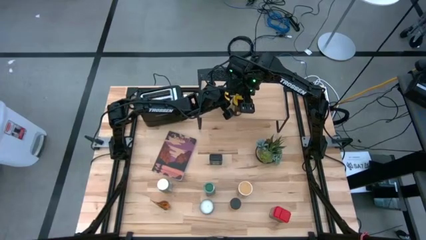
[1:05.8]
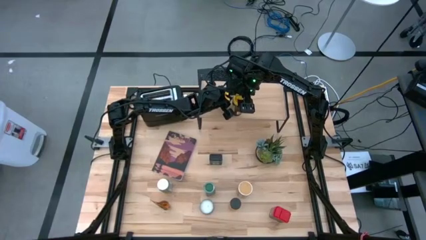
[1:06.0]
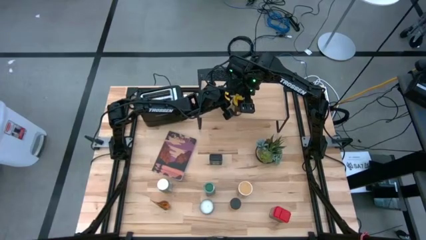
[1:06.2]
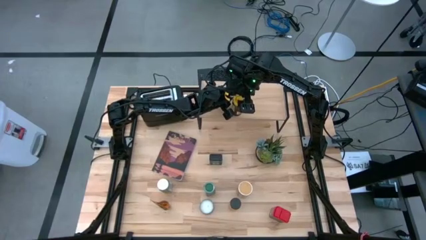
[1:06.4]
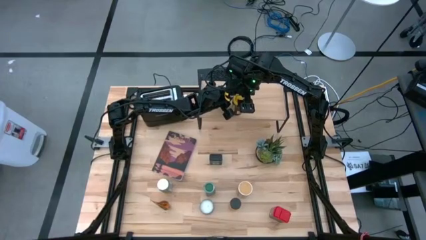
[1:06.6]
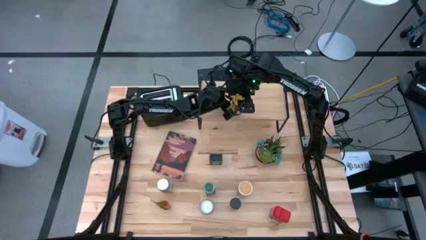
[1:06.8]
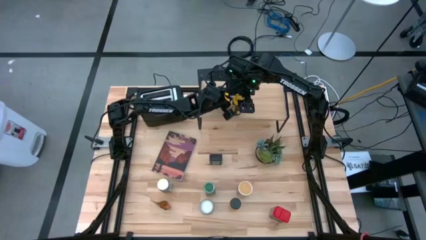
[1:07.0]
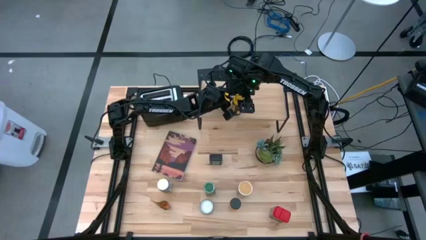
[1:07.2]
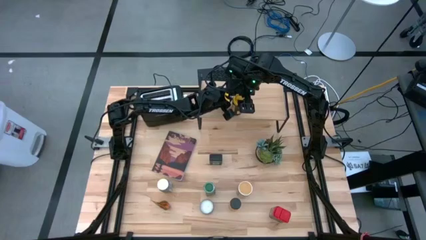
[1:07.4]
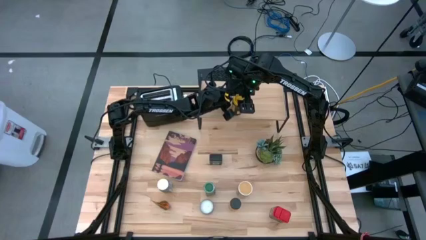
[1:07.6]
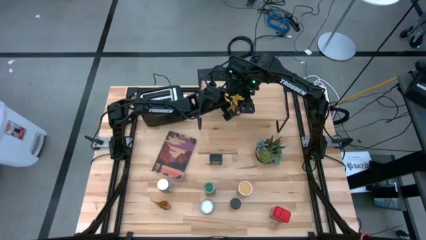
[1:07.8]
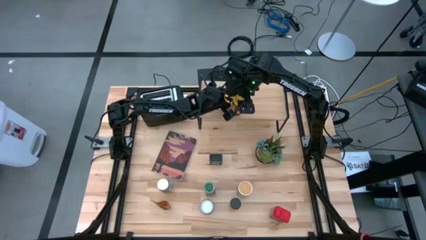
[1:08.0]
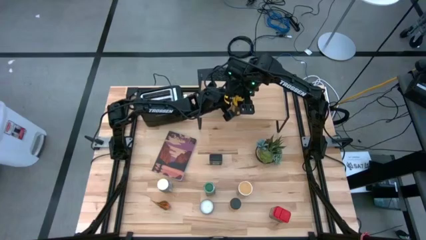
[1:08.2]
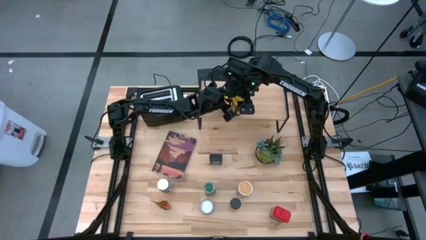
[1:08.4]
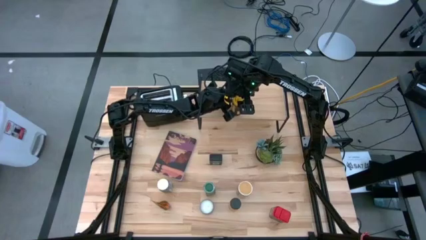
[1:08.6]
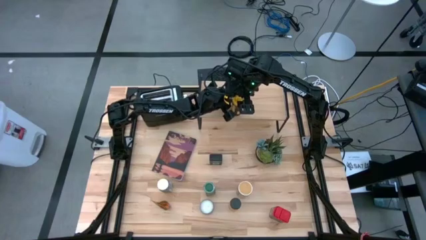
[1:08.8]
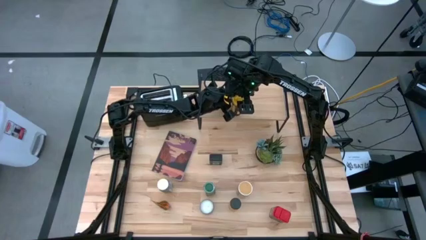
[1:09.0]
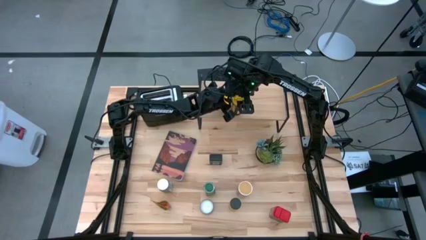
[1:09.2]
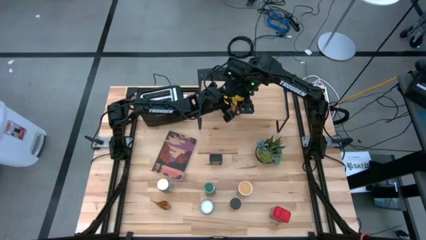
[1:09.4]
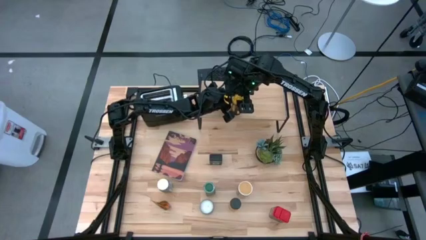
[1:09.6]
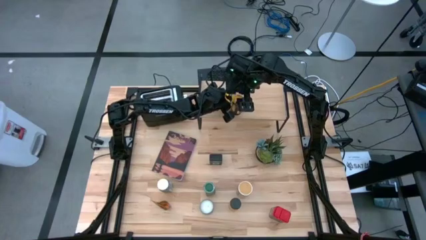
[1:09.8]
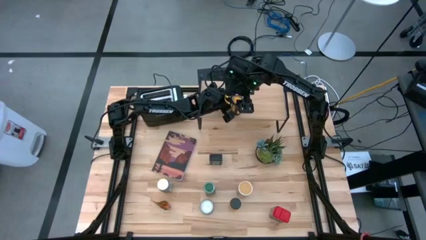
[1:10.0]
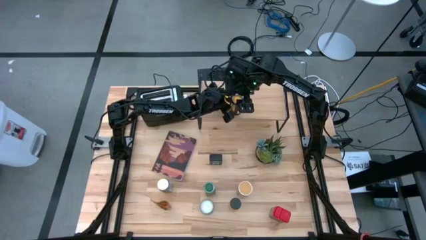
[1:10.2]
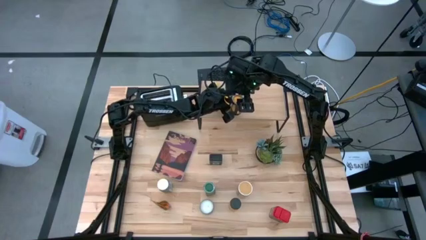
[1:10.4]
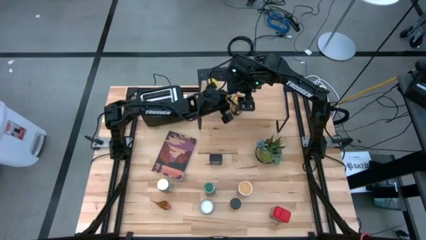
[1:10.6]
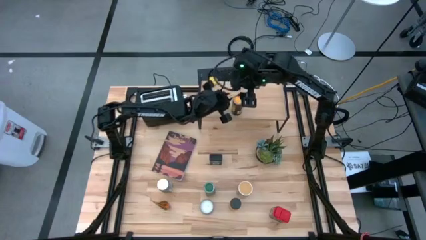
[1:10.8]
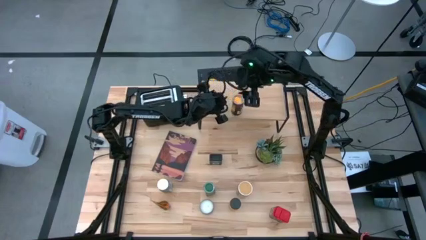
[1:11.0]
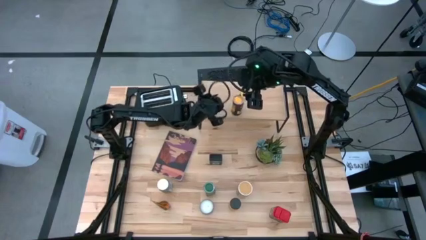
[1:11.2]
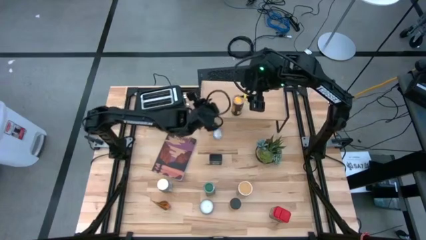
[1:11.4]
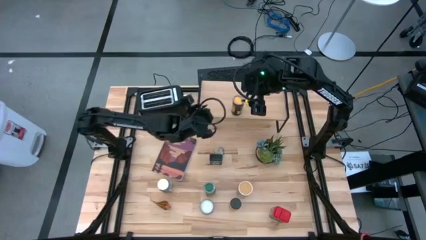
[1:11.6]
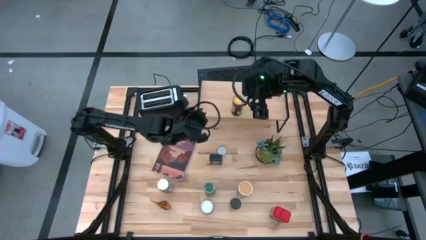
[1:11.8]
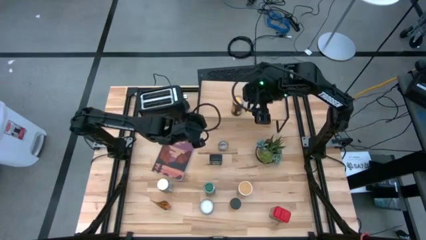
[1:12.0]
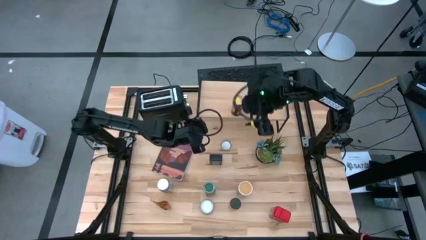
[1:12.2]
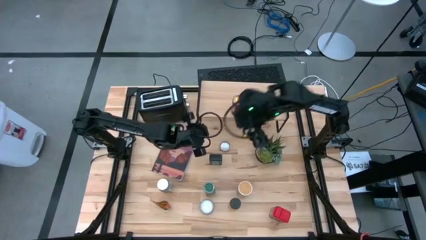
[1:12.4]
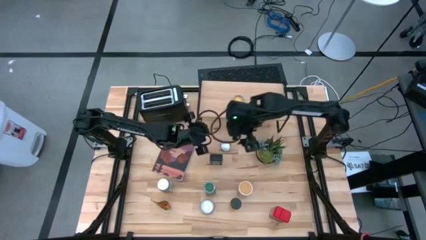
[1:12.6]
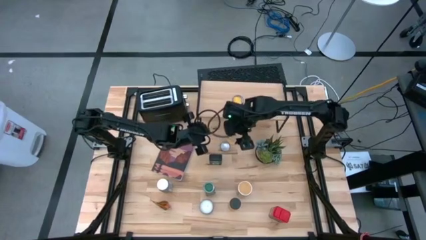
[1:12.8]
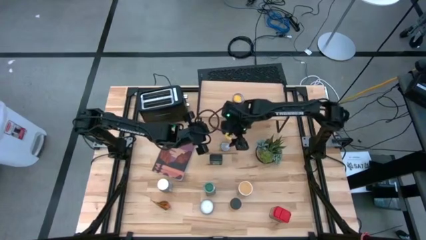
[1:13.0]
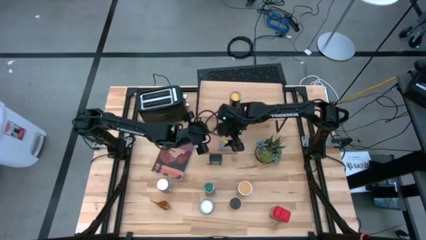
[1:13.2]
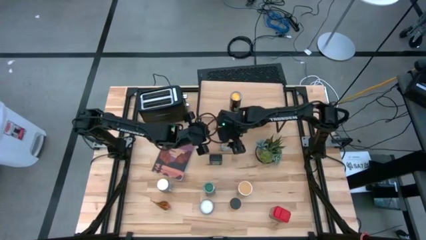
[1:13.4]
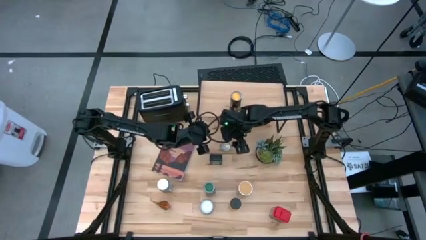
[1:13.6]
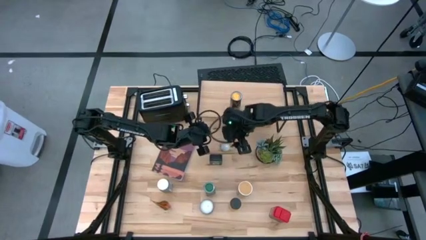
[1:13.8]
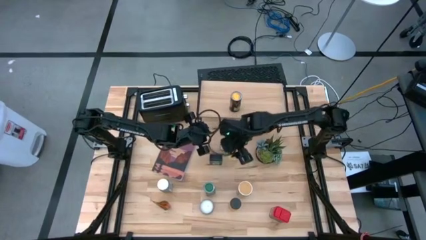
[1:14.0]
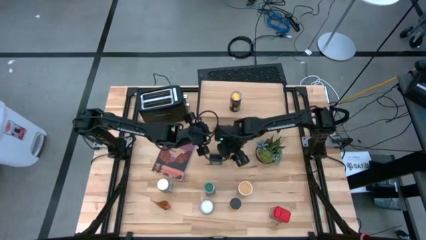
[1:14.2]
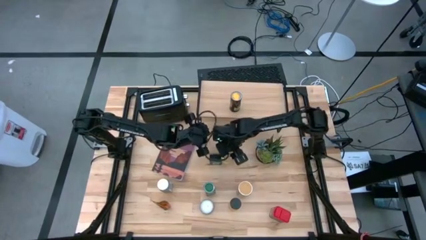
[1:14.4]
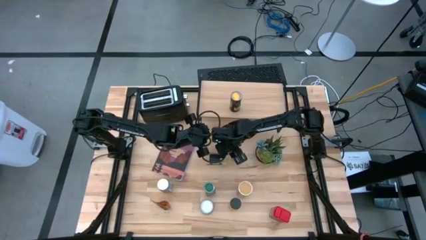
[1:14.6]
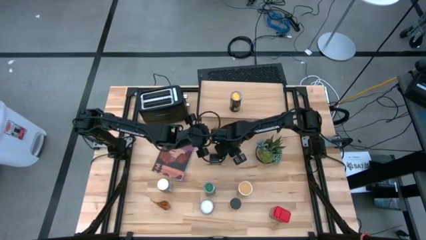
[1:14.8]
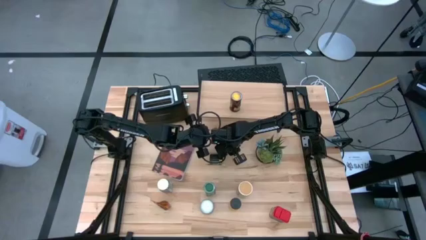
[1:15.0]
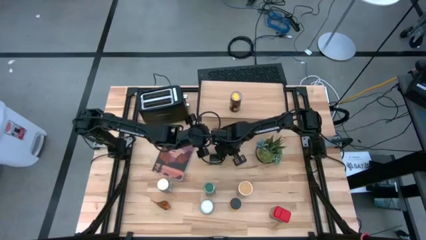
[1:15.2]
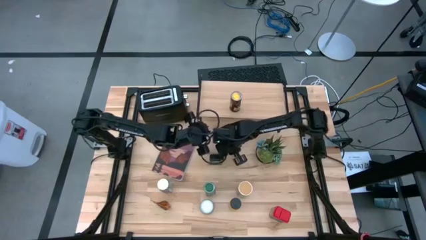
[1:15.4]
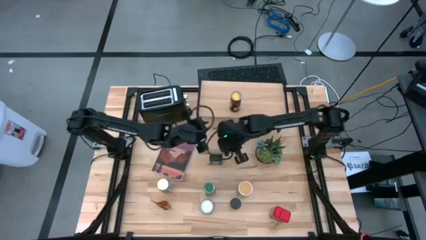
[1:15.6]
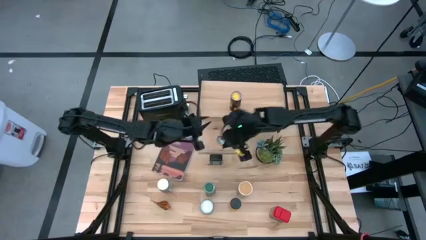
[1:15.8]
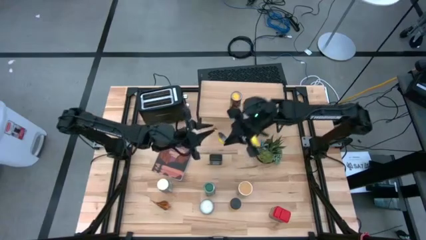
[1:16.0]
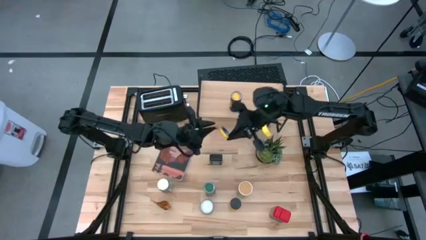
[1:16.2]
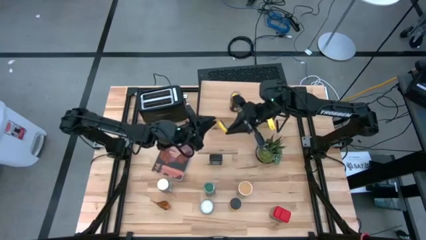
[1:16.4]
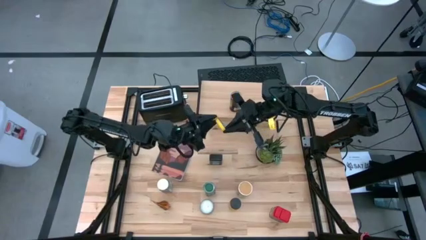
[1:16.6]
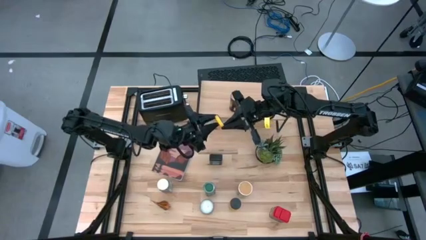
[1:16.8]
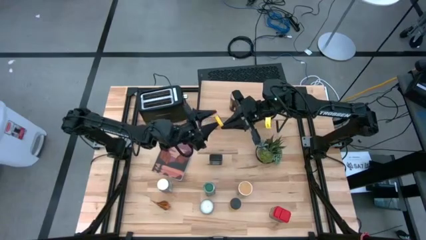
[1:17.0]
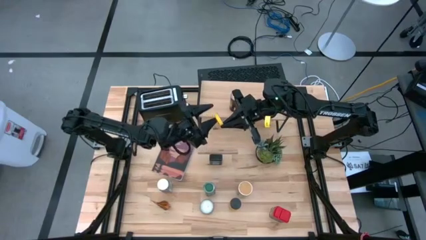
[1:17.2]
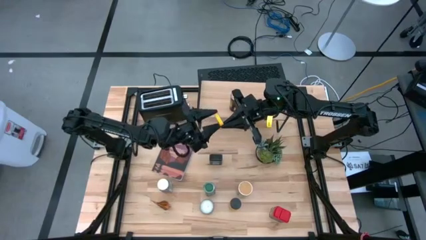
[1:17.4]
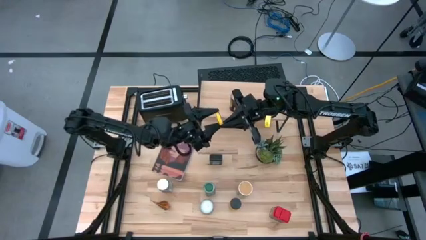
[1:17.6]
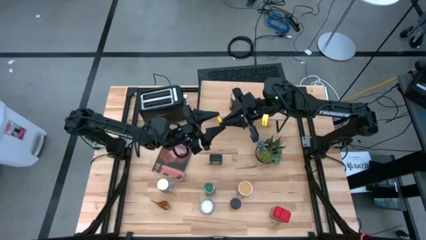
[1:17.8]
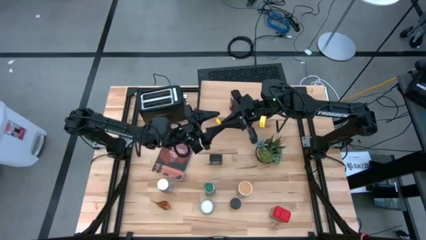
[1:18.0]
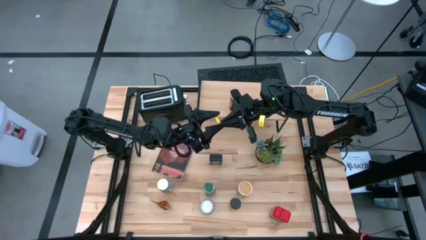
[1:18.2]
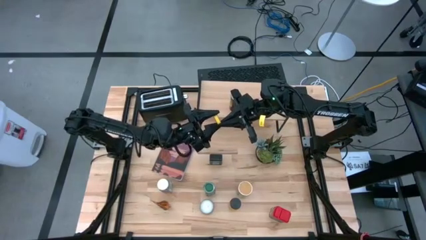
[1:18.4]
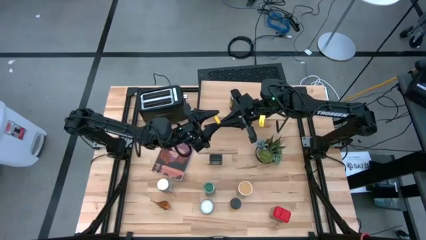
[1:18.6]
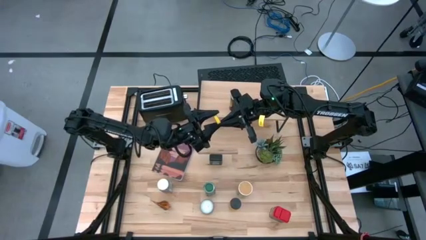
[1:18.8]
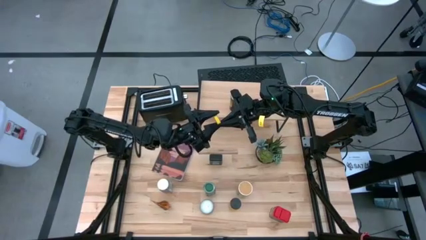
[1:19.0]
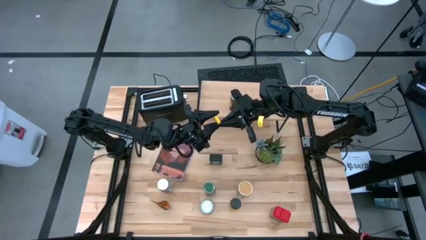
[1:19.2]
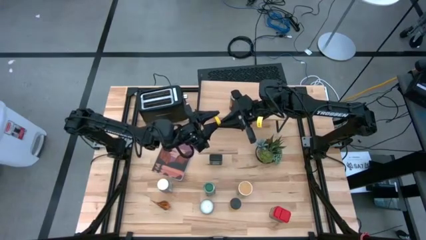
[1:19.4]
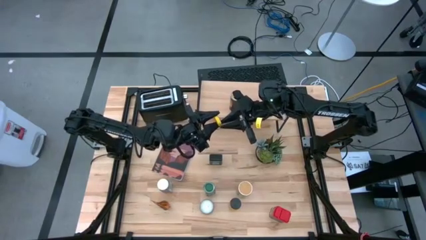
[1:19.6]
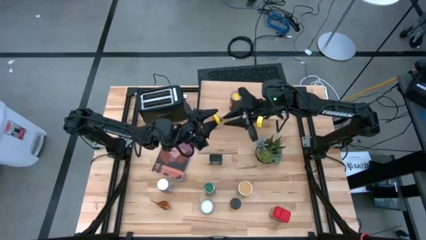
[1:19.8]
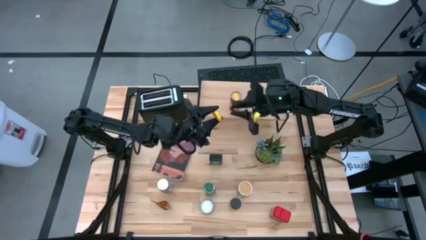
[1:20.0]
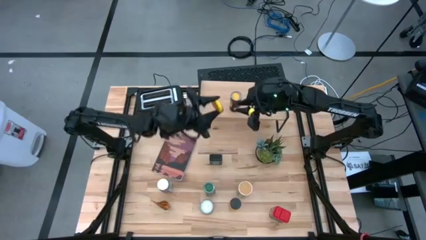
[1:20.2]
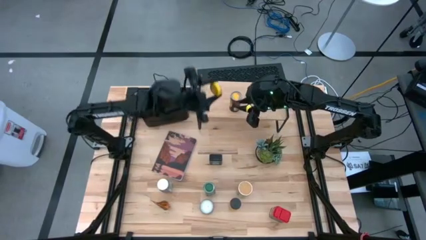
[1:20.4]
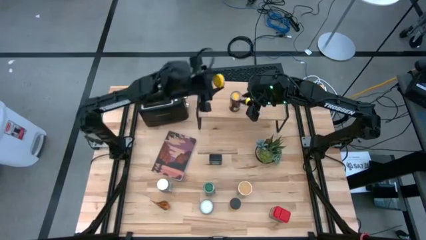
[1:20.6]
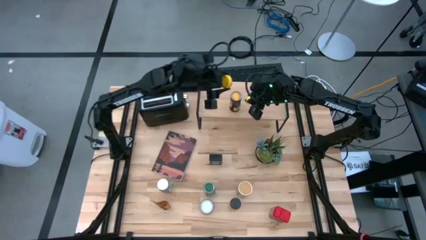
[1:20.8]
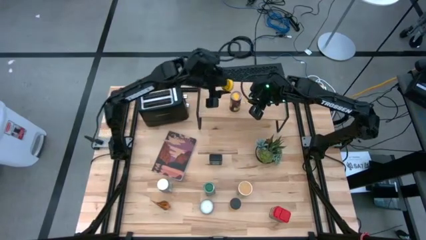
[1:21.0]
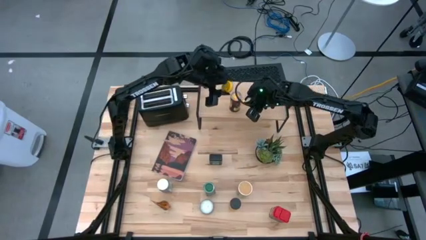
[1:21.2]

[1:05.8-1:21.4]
Task: Shelf spices
Put the yellow cap into the seasoning bottle

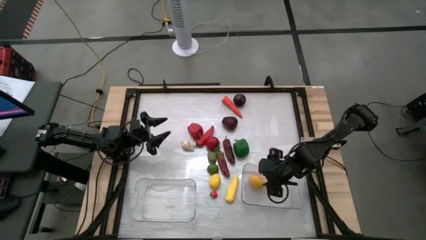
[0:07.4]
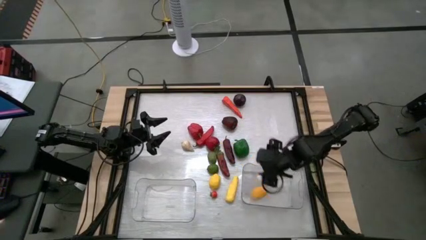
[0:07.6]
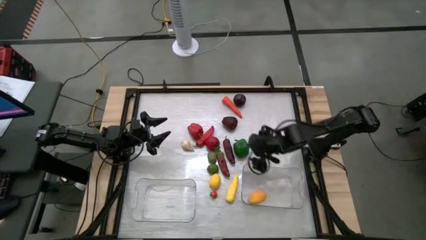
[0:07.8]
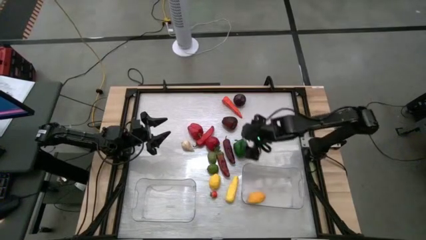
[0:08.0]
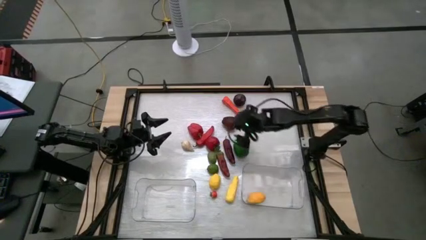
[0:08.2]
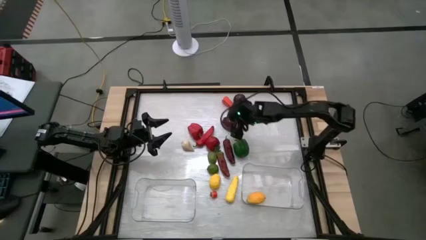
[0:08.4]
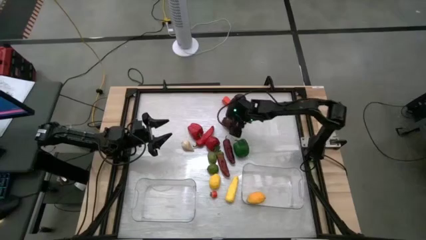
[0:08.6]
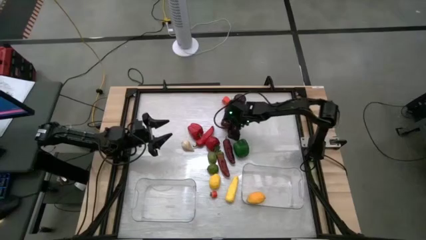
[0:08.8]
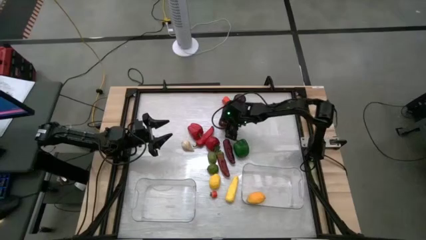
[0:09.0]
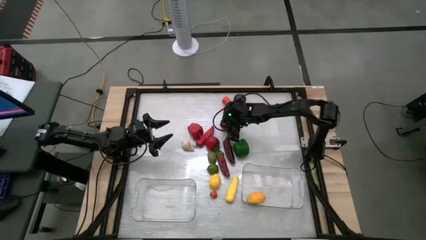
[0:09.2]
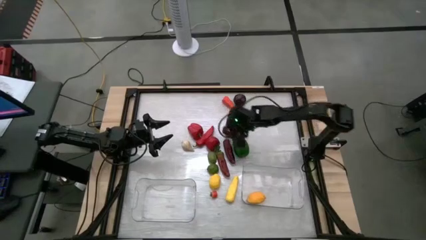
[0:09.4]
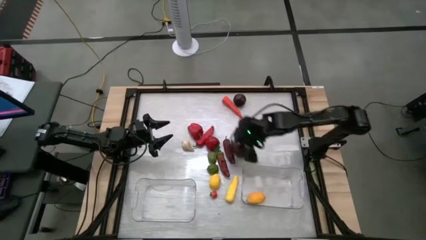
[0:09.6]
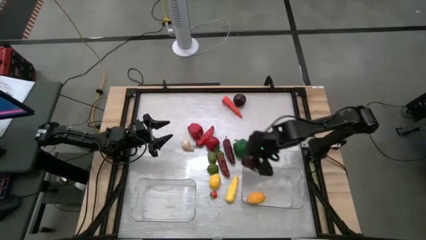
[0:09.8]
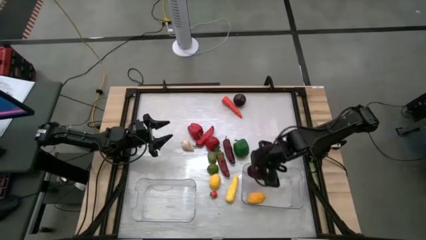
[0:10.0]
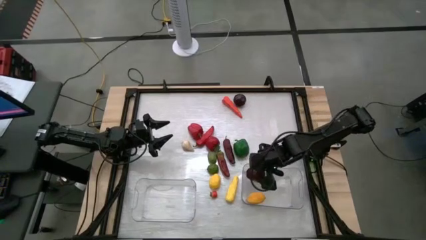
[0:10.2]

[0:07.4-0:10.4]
Task: Sort produce into baskets
Put the apple into the right transparent bin
